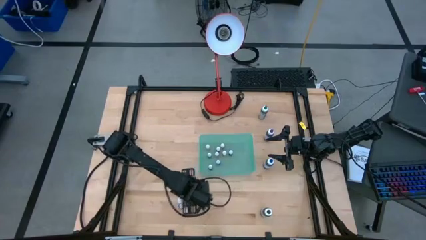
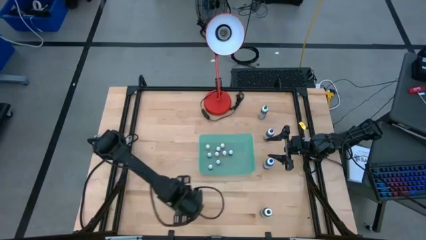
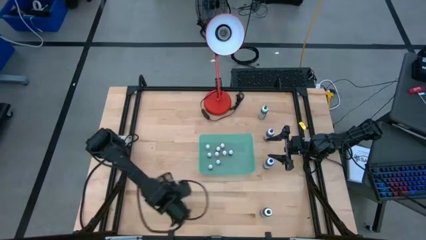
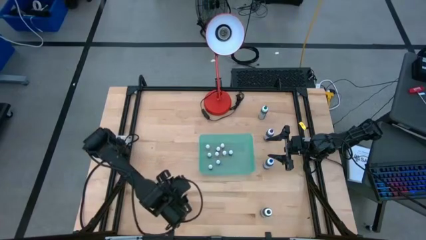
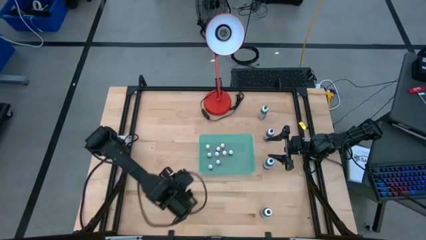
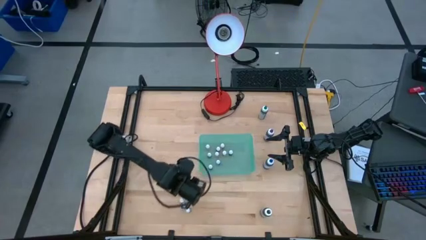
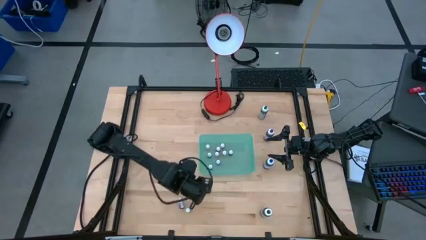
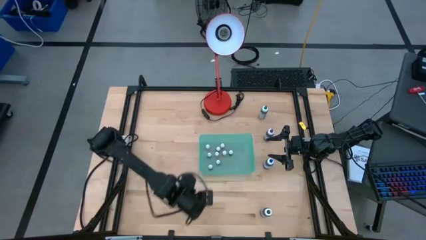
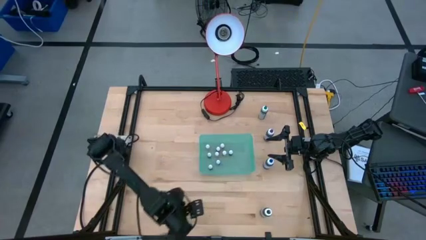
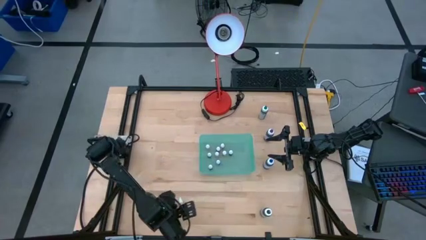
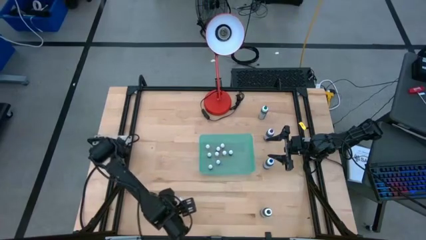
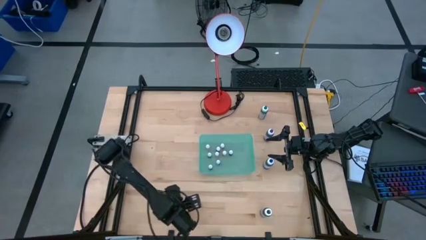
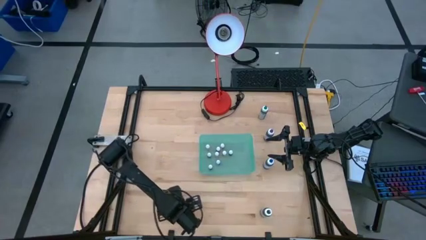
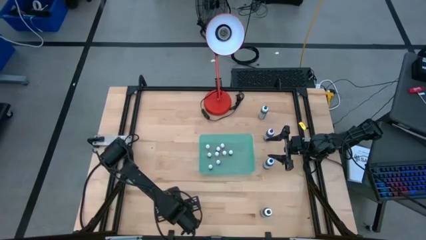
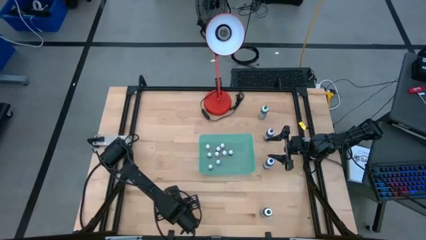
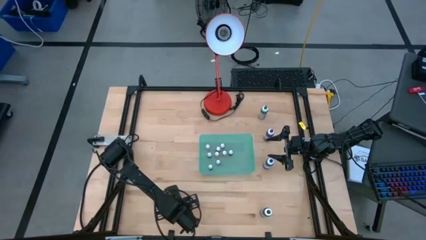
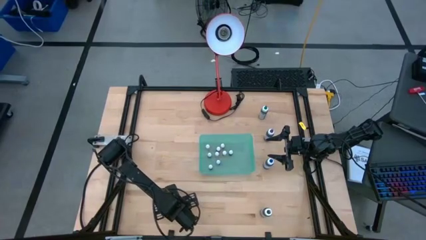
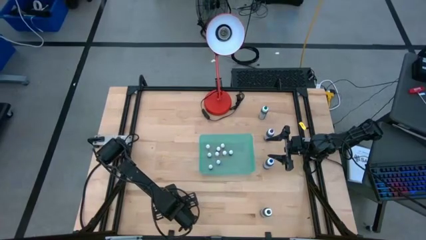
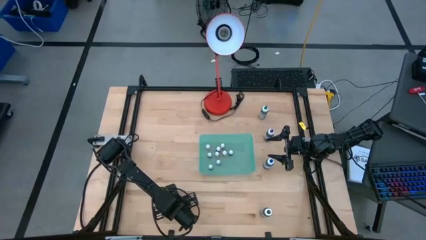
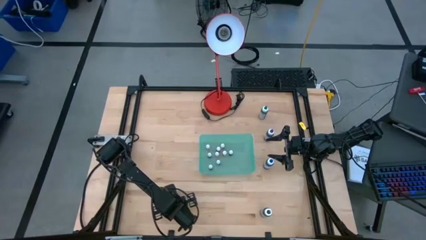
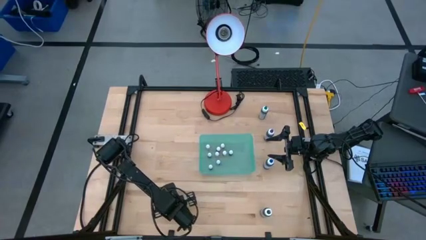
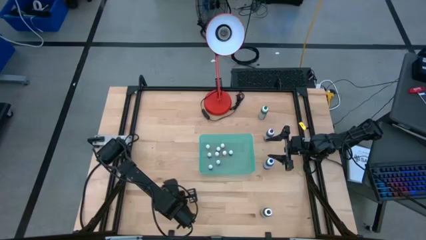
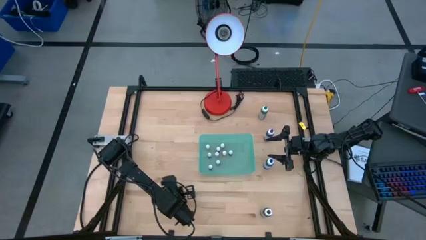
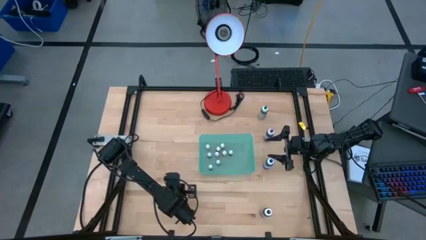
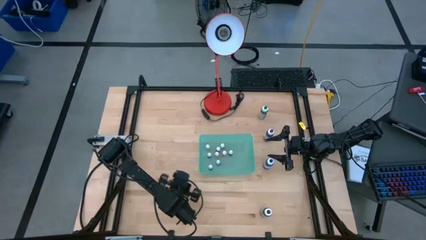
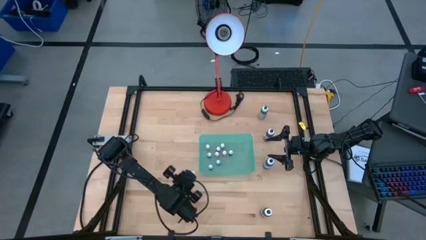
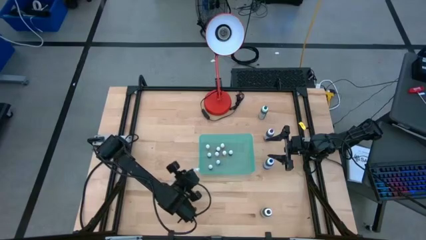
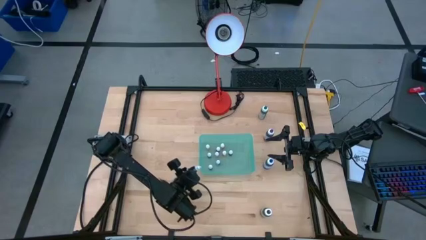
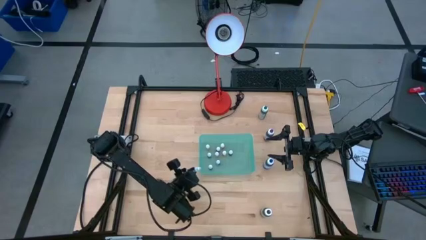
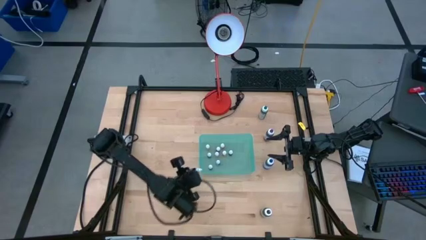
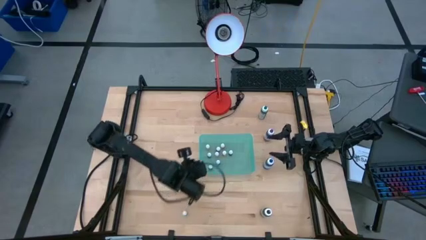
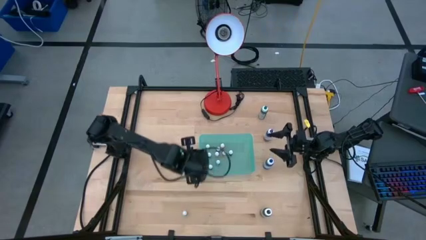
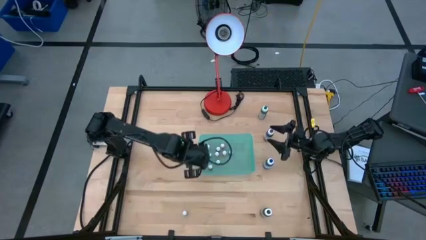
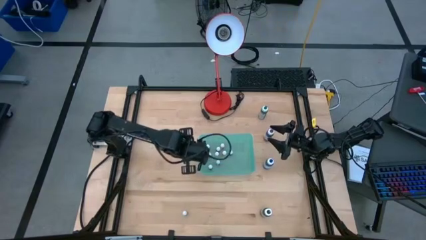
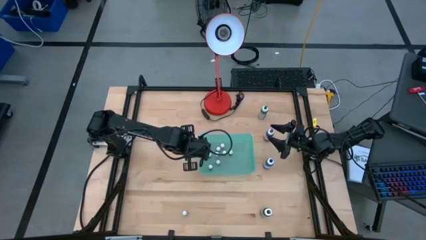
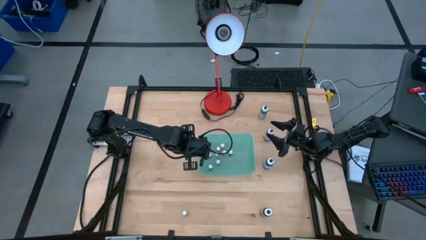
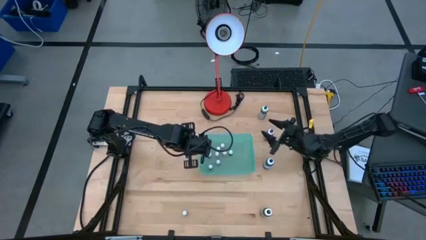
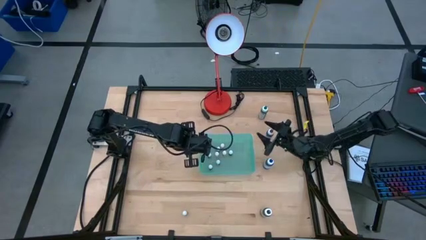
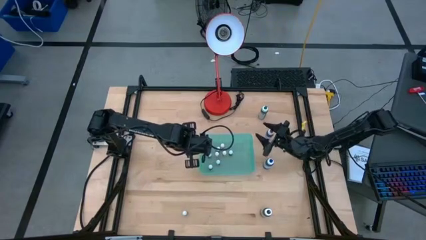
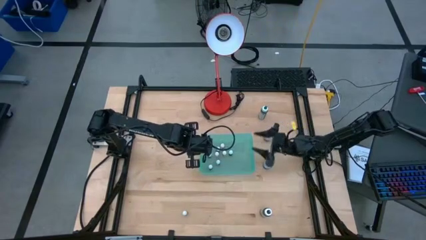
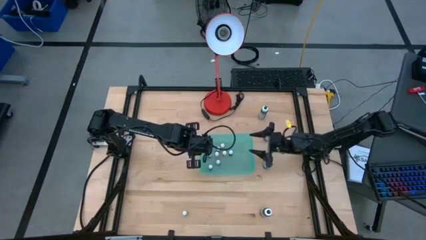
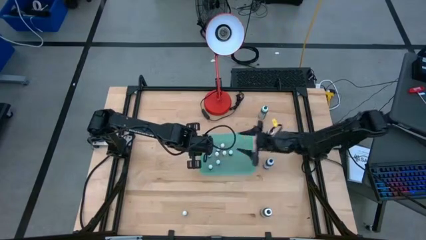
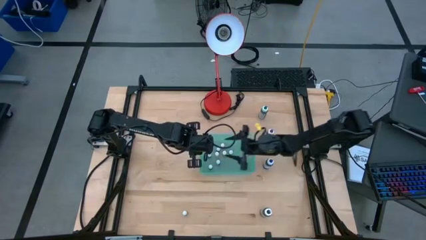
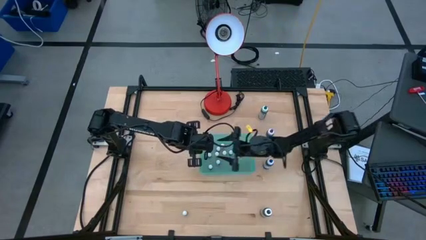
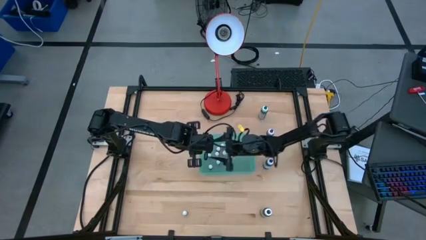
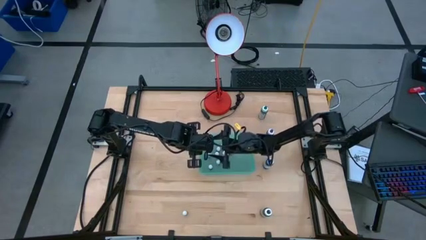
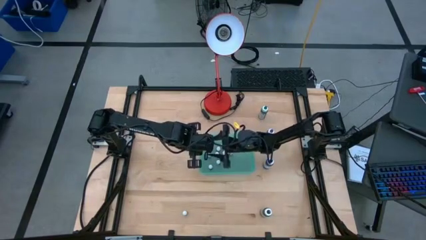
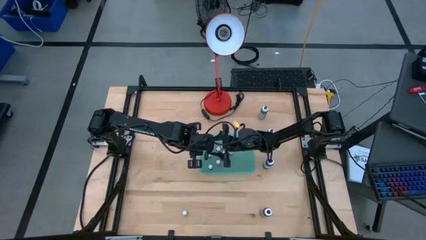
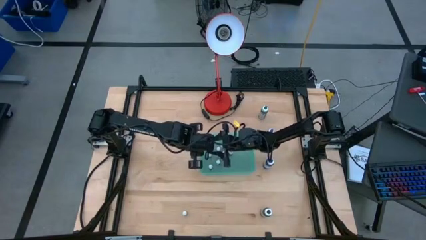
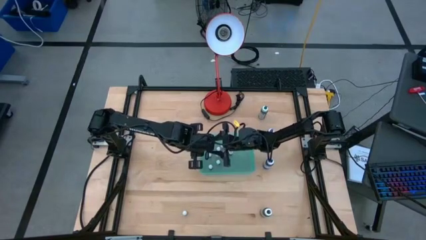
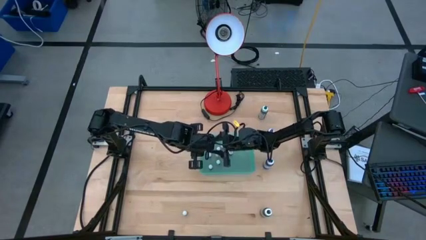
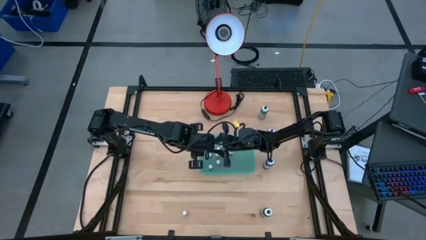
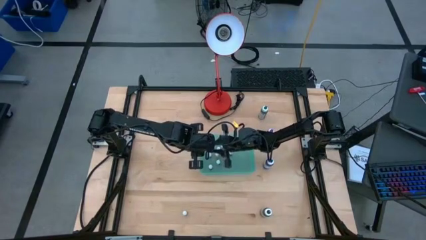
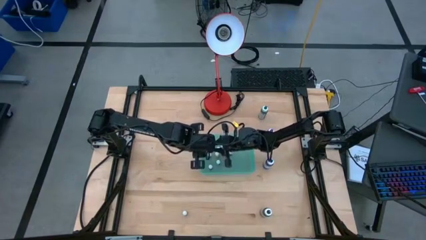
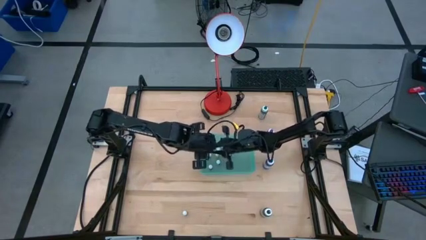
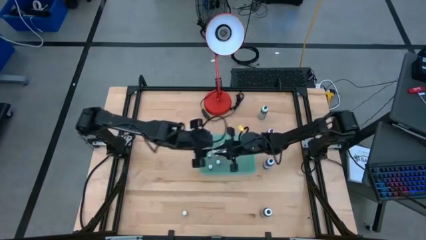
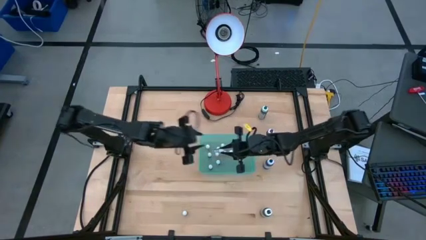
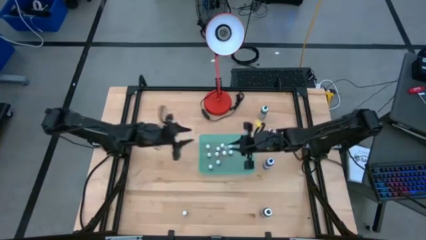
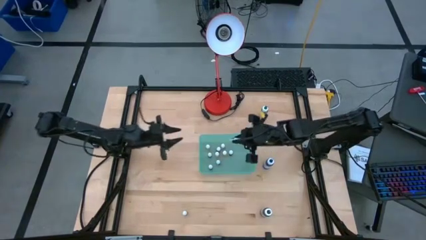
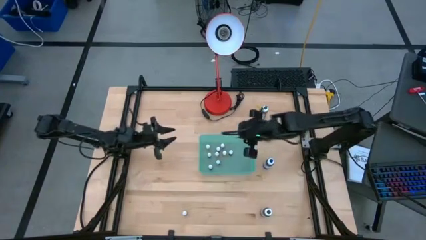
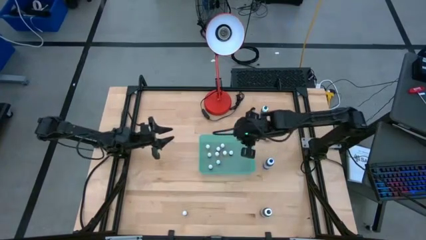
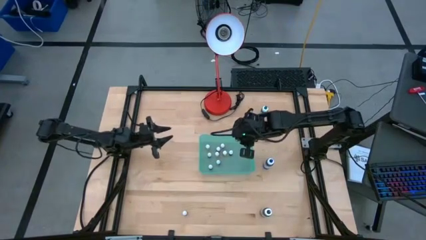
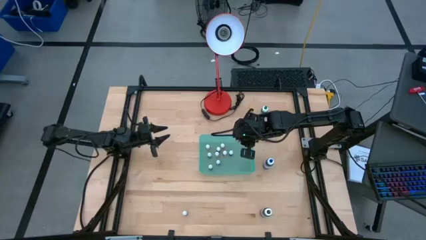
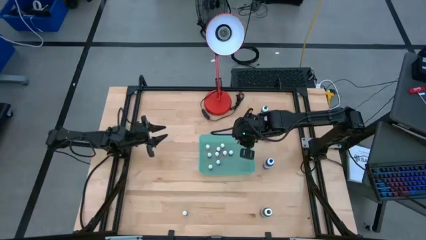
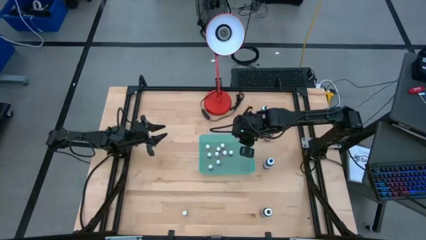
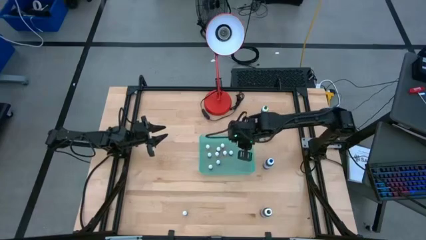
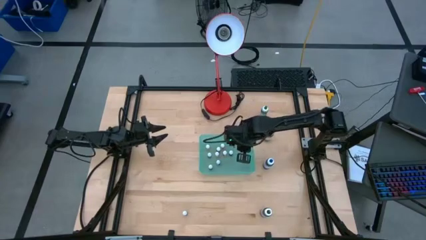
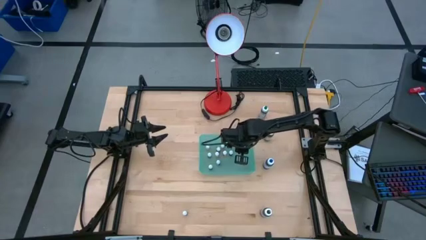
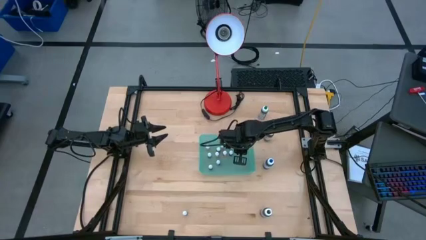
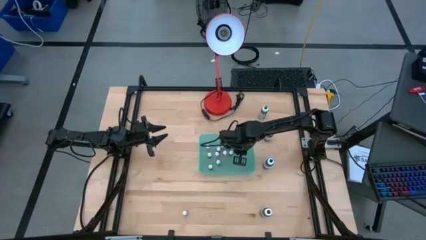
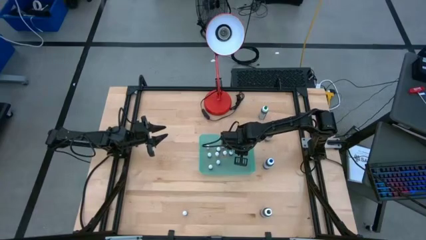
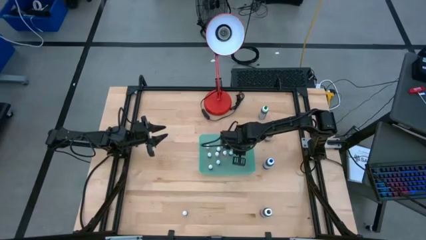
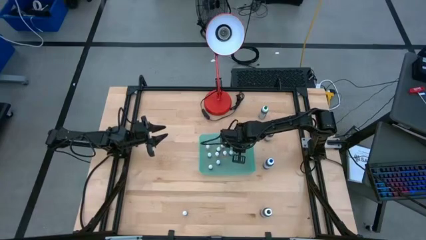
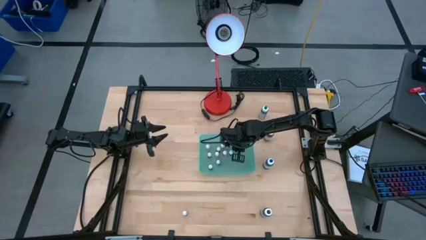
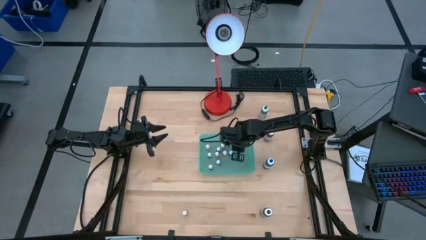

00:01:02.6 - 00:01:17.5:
Task: Pick & Place food coloring
Put the small blue food coloring bottle into the green bin

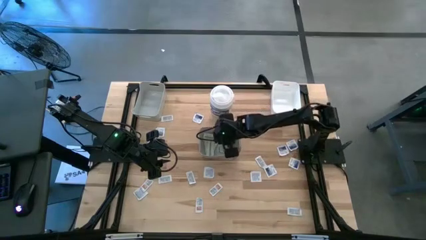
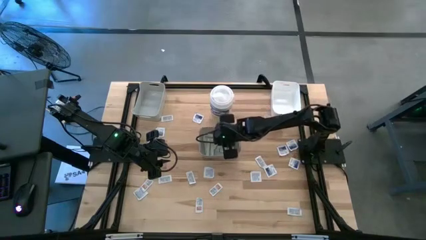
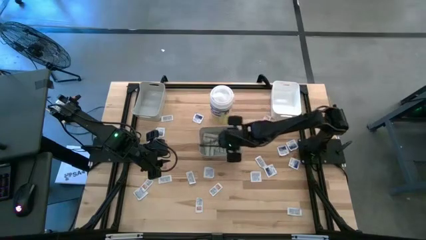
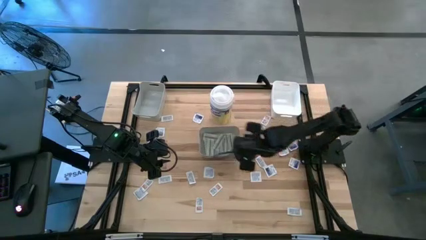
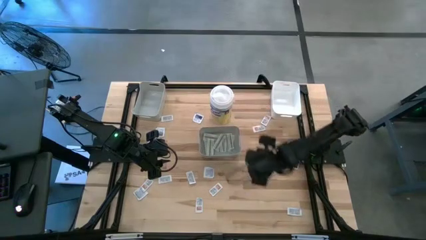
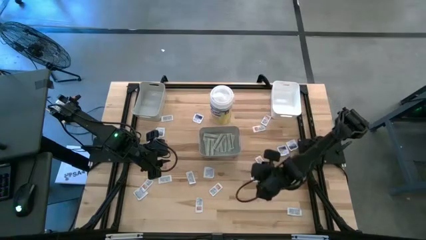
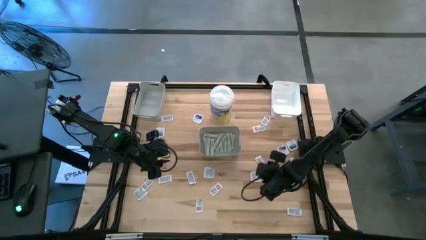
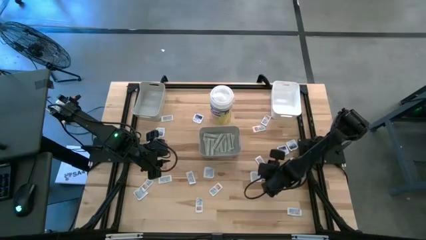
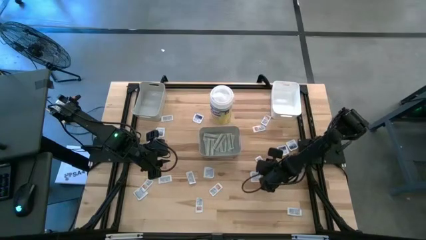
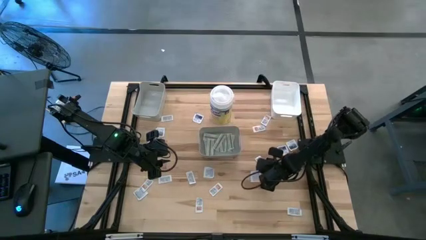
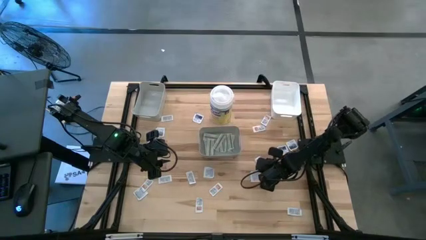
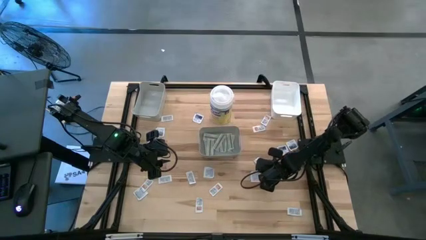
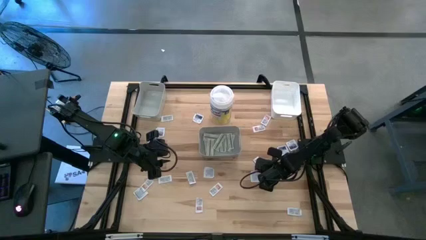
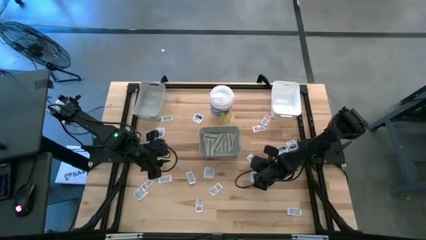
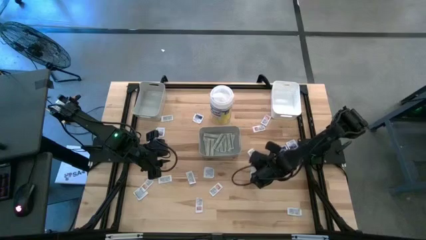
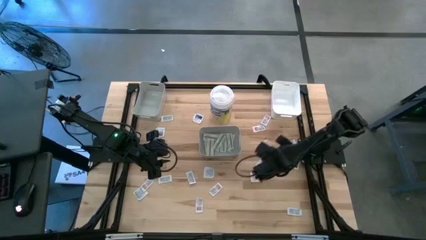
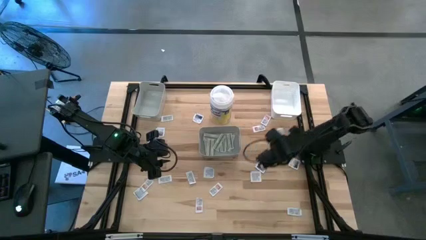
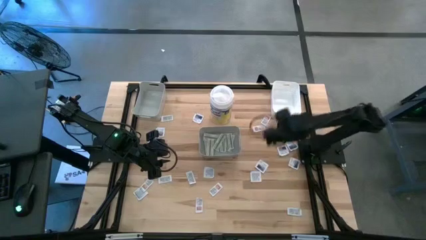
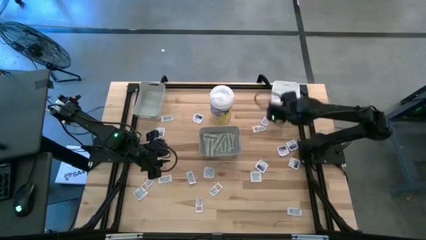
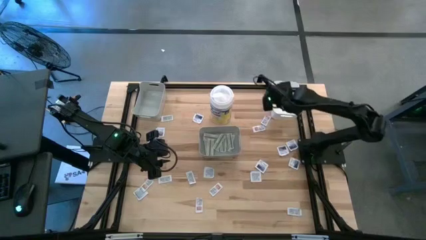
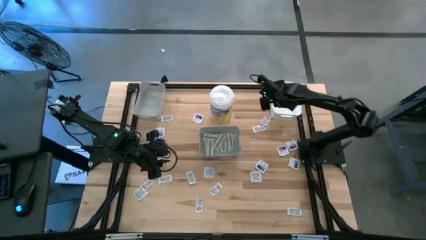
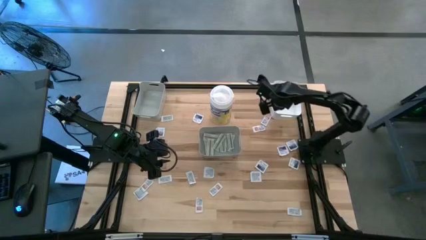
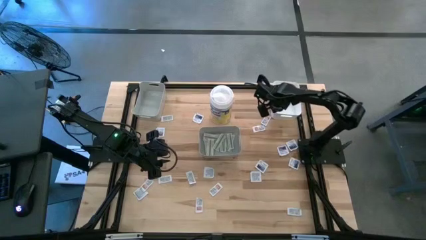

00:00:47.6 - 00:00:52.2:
Task: Pick & Place First Aid Supplies
Put the ointment pad into the white bin
